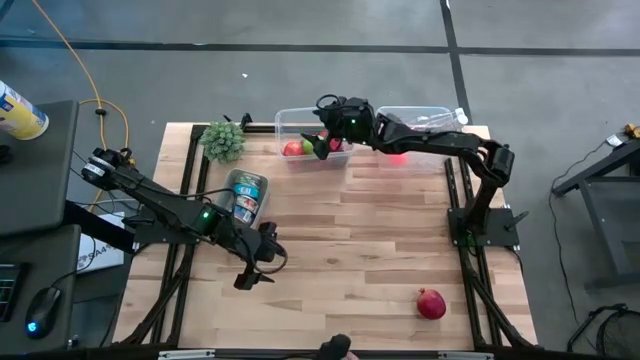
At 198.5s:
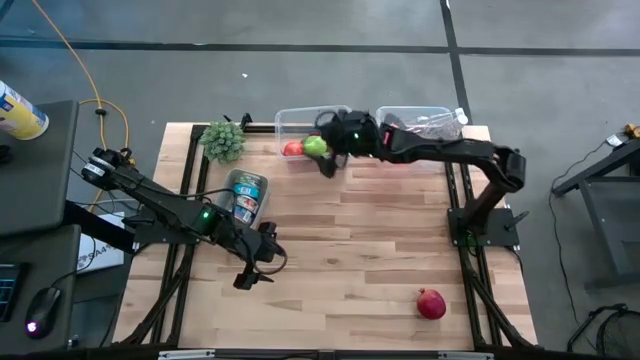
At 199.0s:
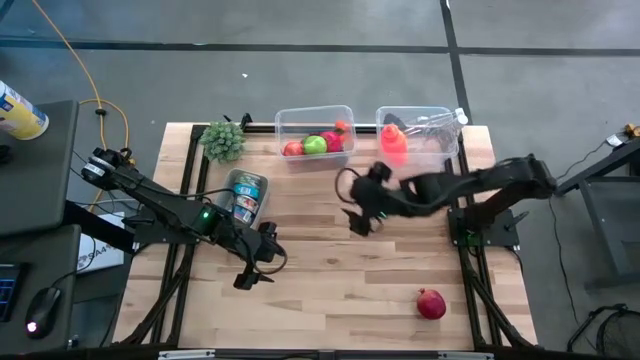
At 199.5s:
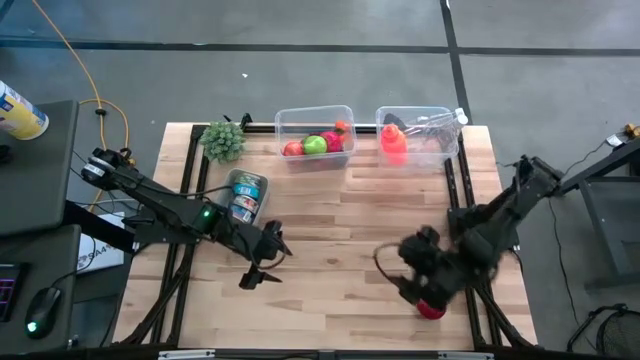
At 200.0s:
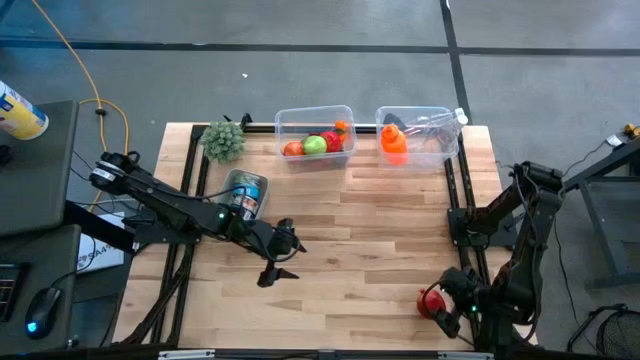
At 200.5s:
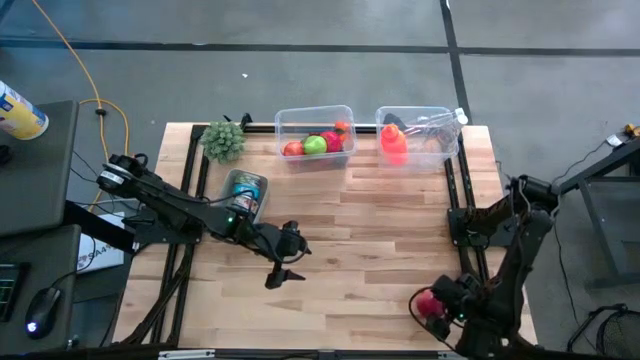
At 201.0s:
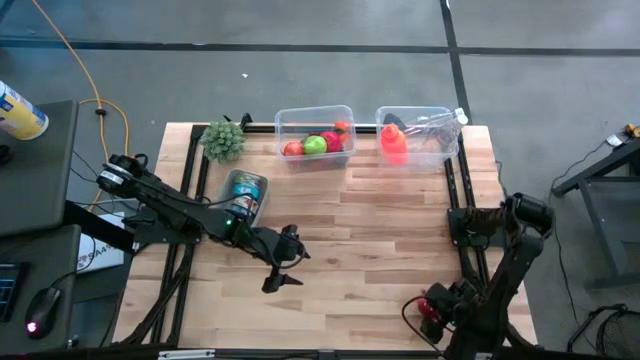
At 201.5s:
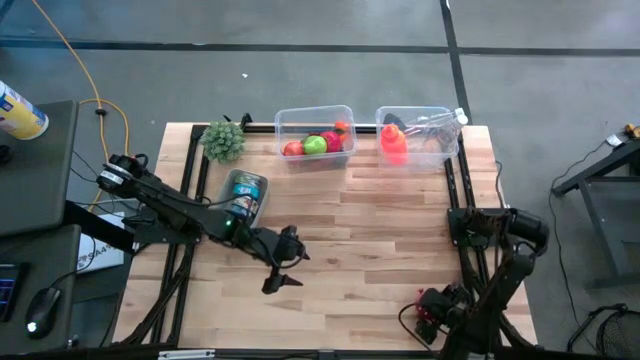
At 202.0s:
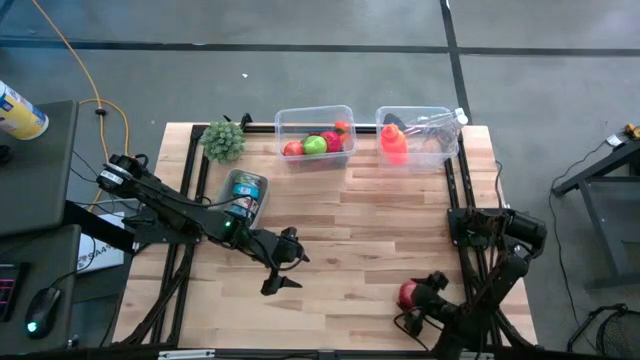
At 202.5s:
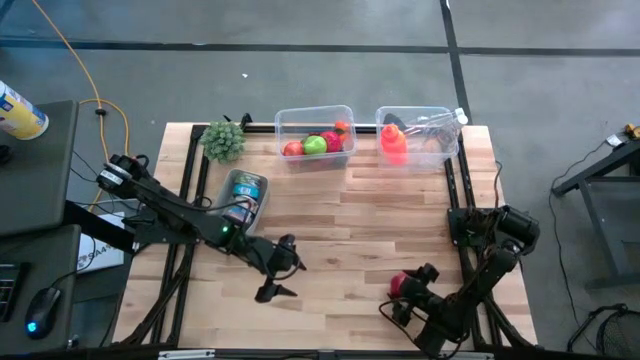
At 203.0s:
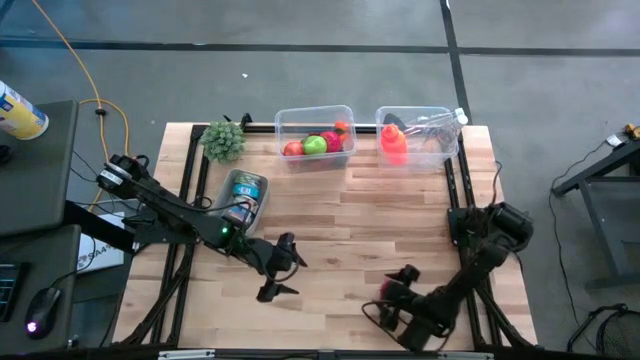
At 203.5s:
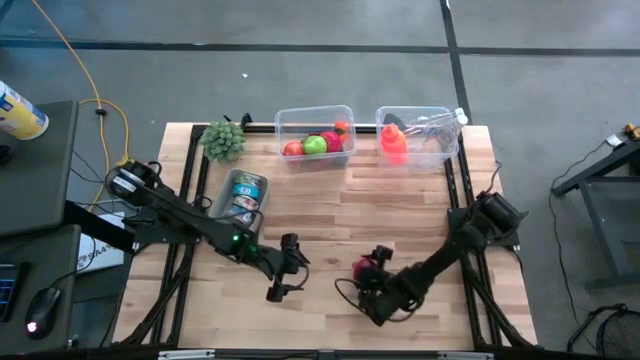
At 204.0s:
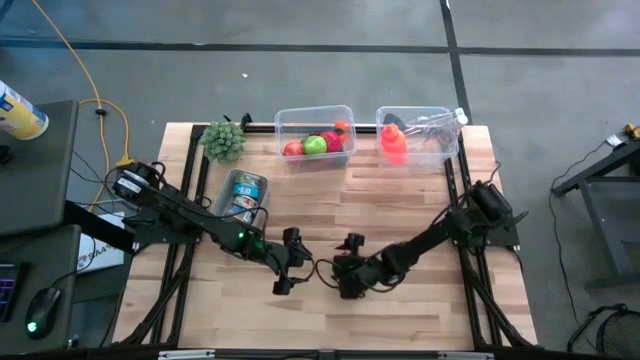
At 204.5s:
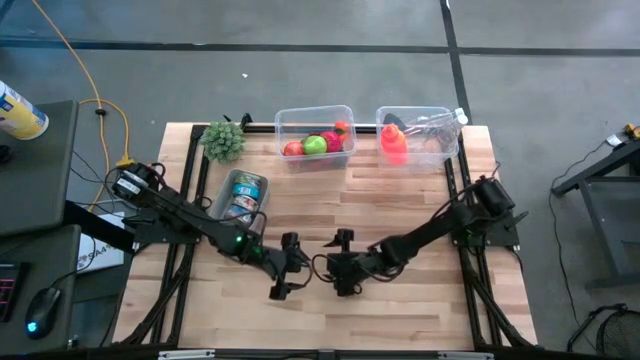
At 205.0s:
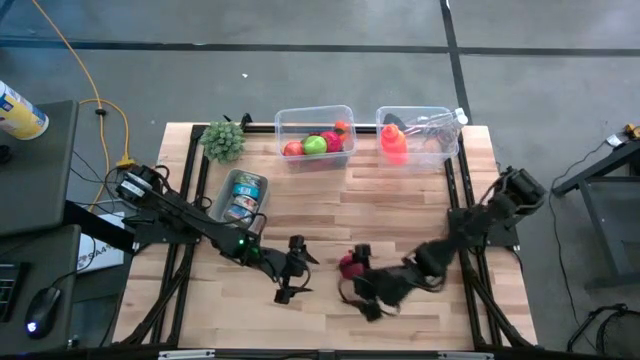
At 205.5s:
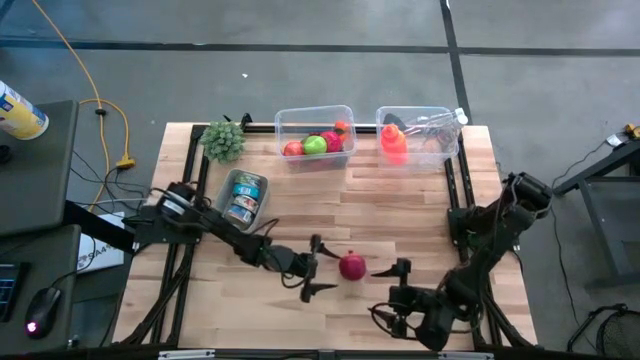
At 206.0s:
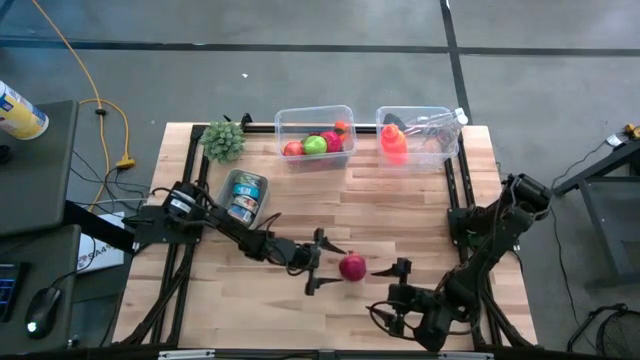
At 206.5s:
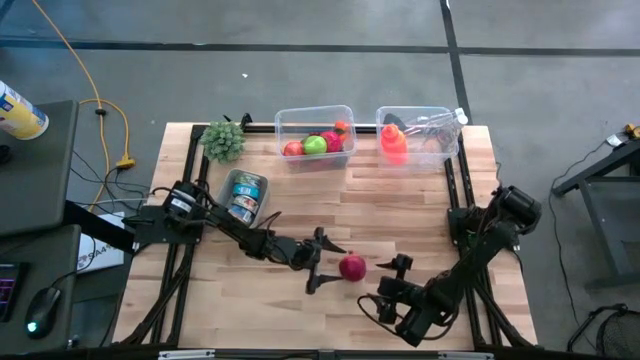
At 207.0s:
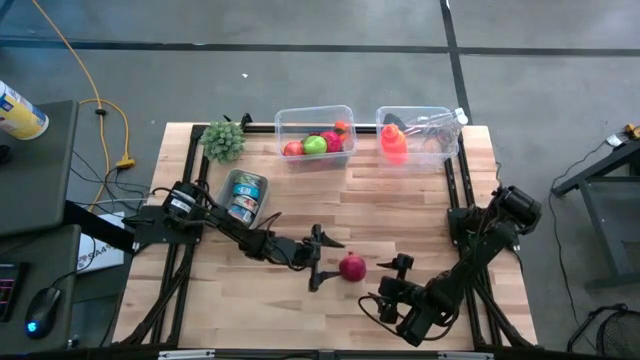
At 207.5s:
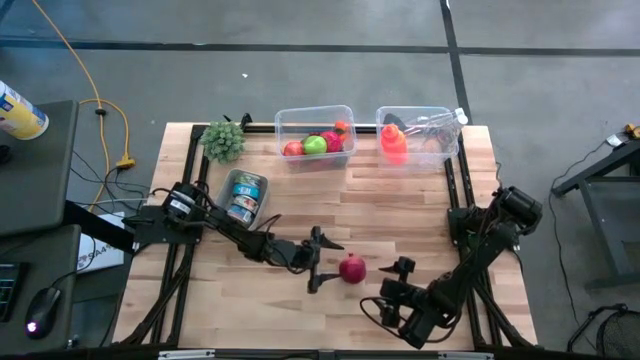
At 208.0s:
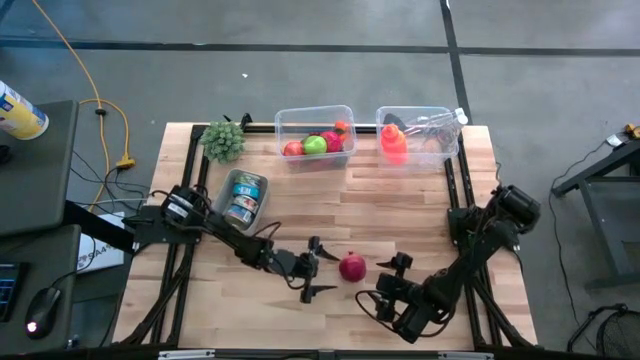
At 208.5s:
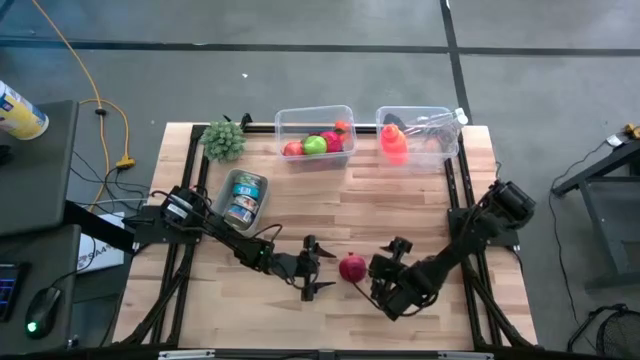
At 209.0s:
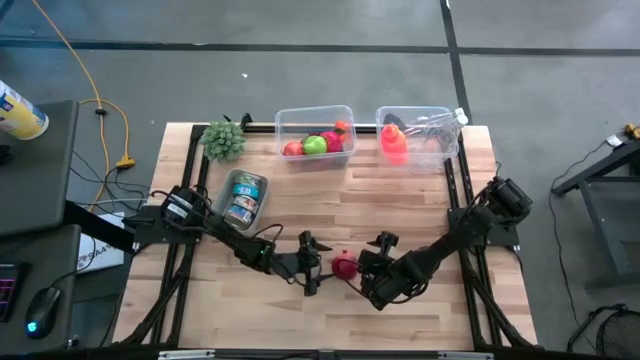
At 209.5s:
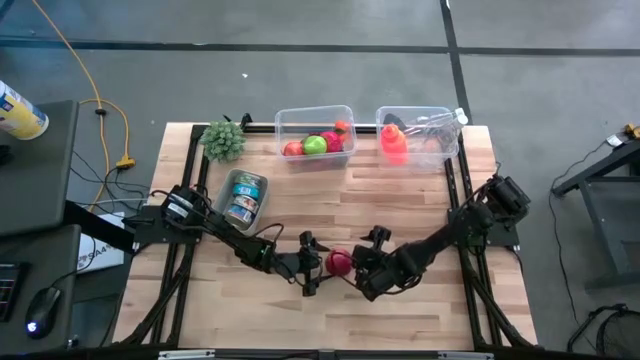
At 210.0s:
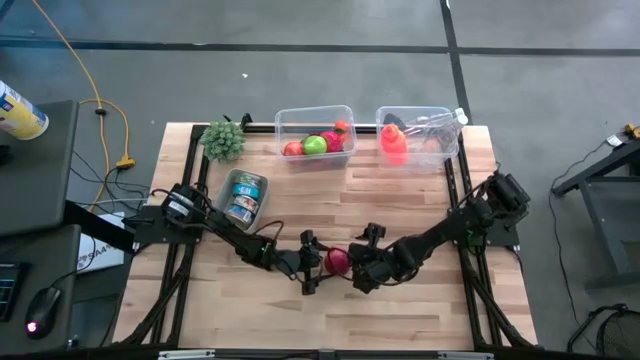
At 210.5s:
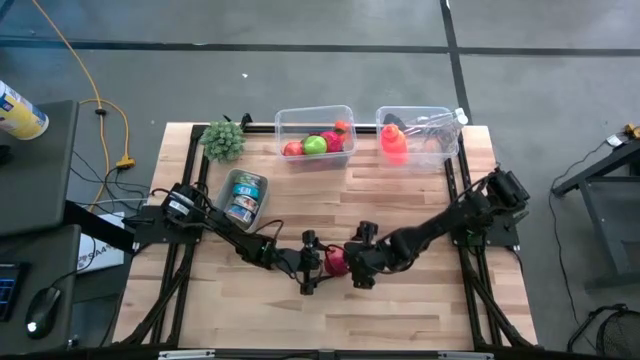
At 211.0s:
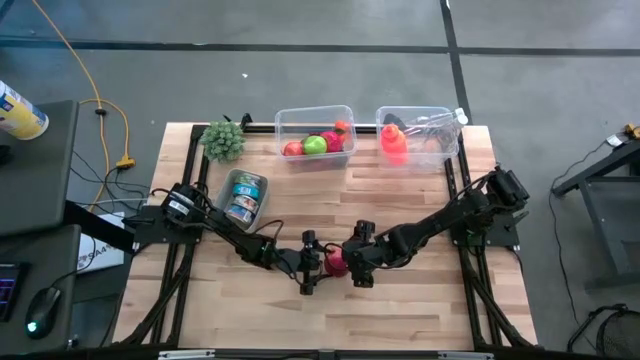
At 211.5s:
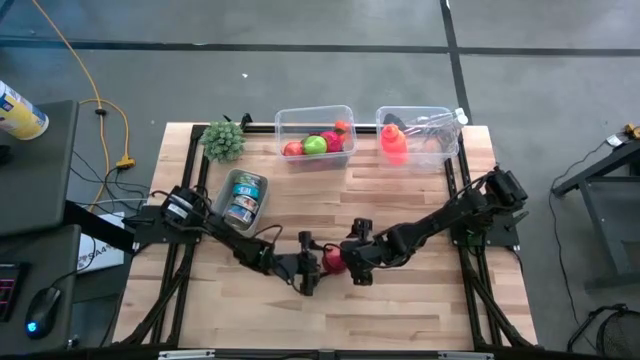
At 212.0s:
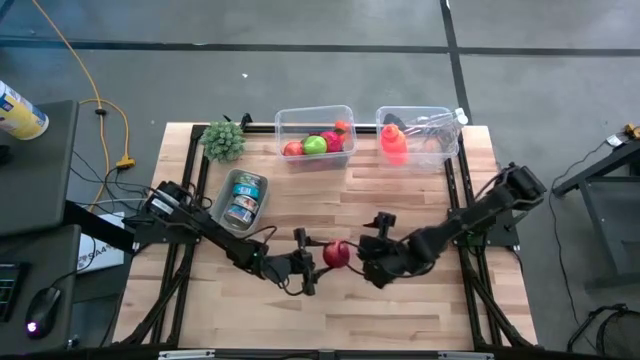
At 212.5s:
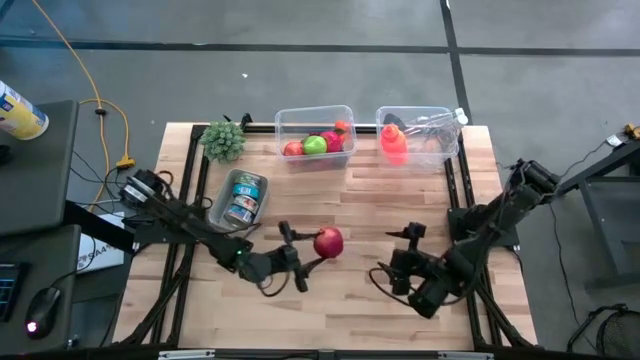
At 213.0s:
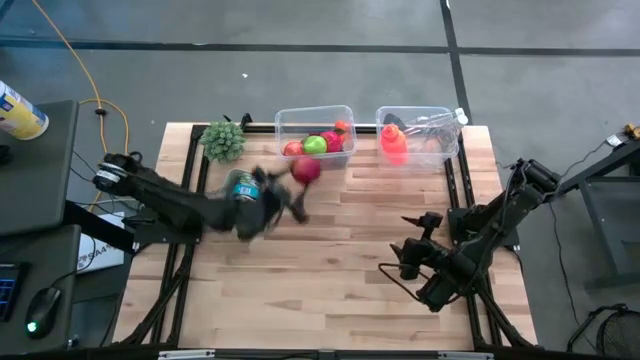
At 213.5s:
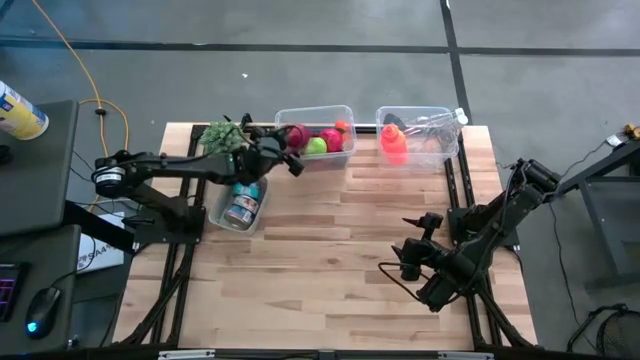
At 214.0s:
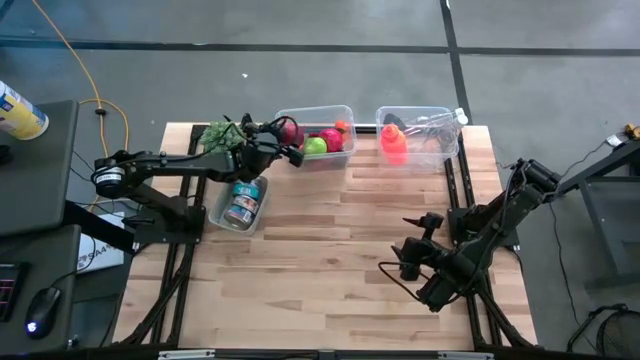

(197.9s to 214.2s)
Task: Pick & Place Food Item
Put the pomegranate into the left transparent bin

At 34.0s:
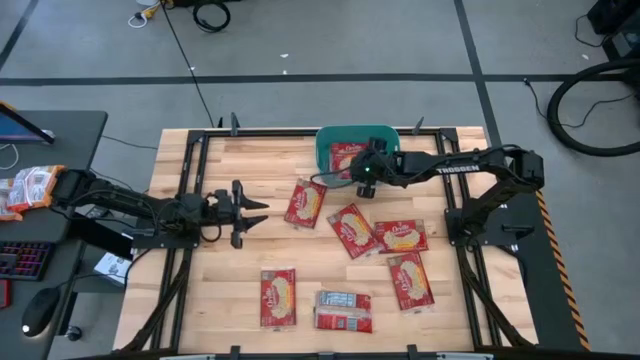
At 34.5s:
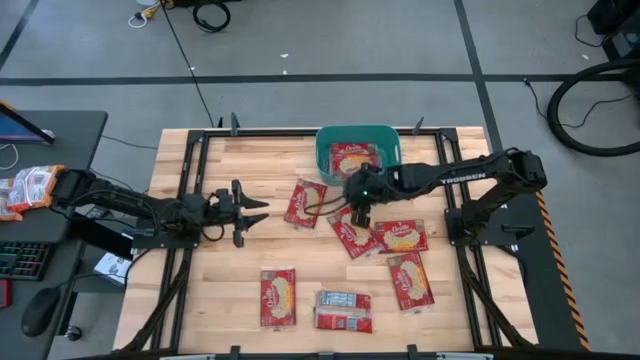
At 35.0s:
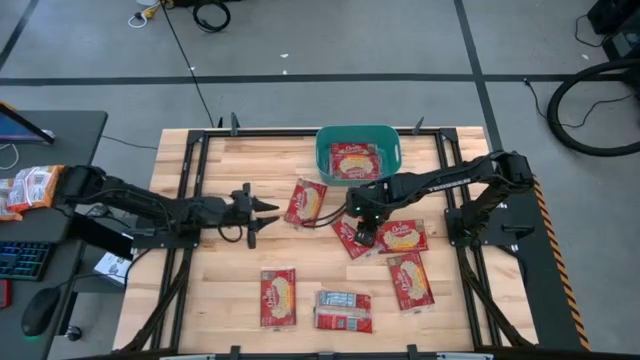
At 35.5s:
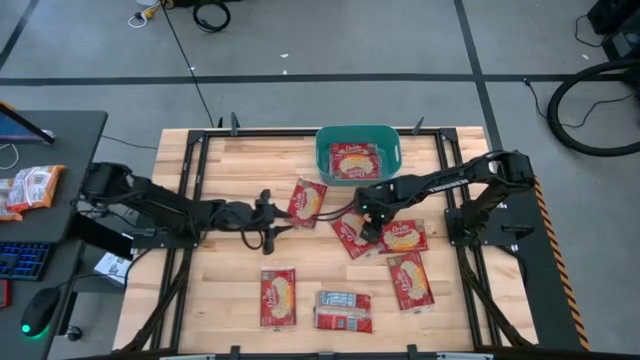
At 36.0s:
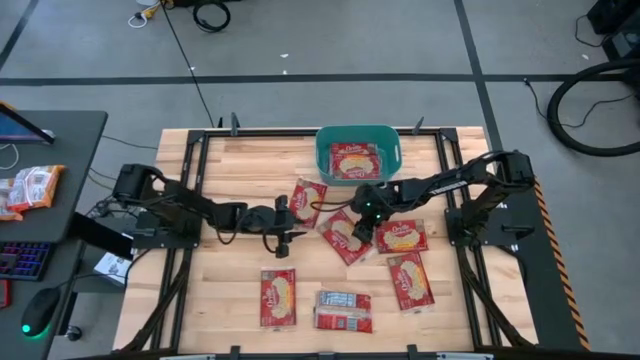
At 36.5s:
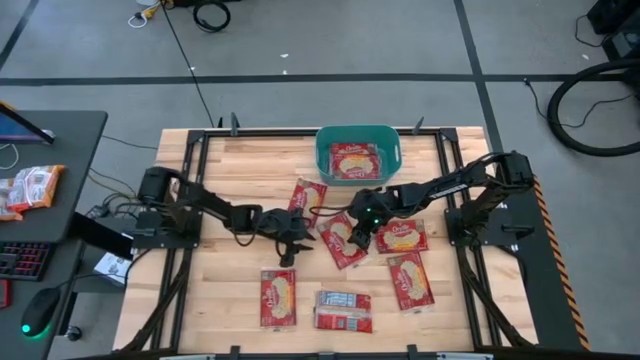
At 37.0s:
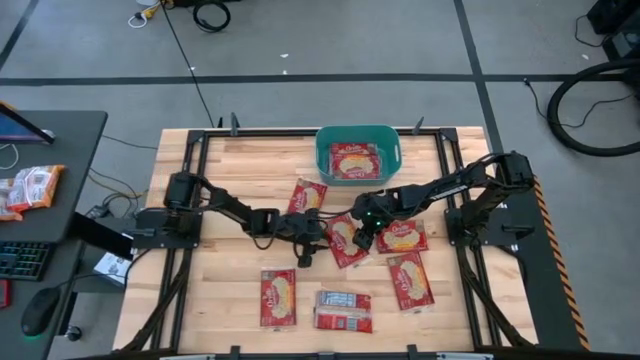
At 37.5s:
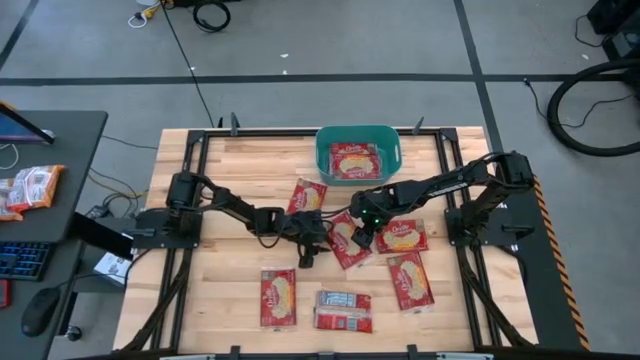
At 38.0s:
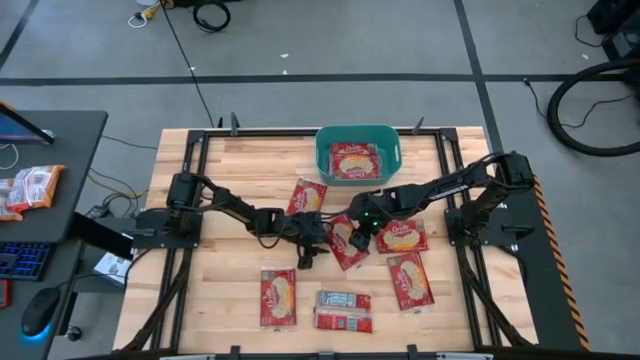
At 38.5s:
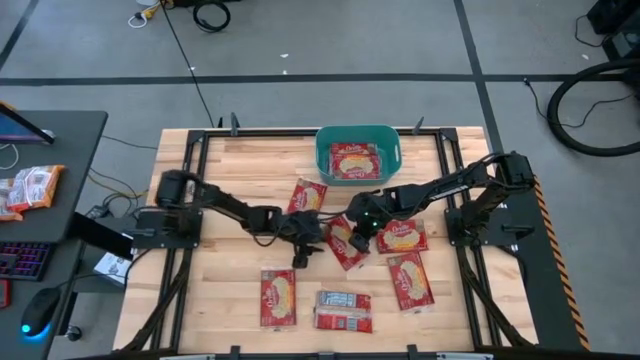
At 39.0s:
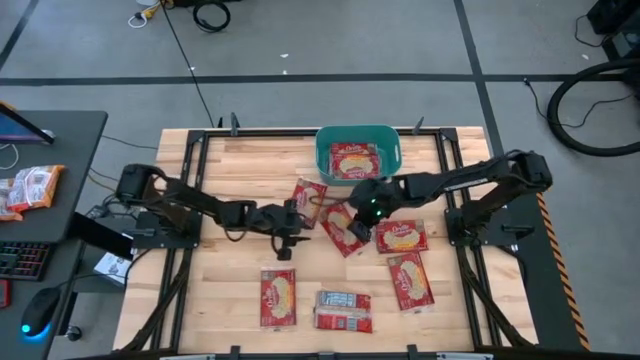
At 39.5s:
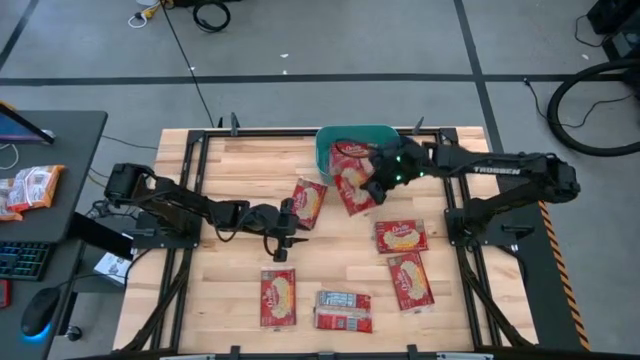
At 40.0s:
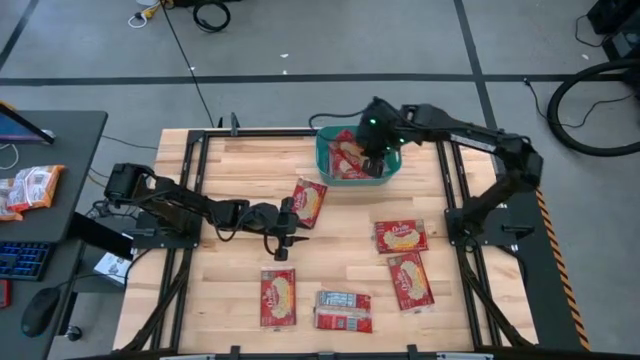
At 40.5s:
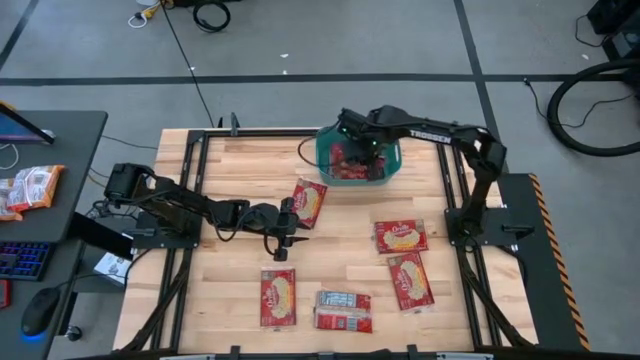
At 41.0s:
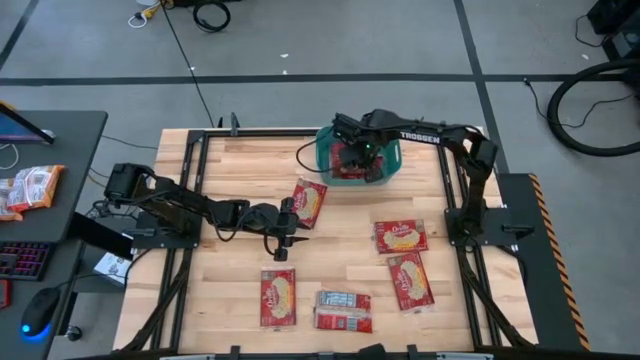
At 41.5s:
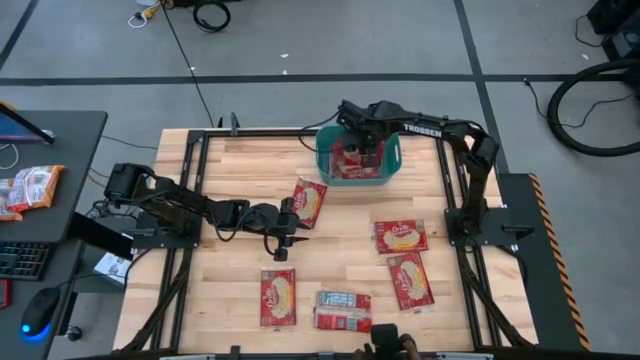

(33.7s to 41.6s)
Task: Sort popcorn bags into baskets
Put the red popcorn bag into the blue bin
